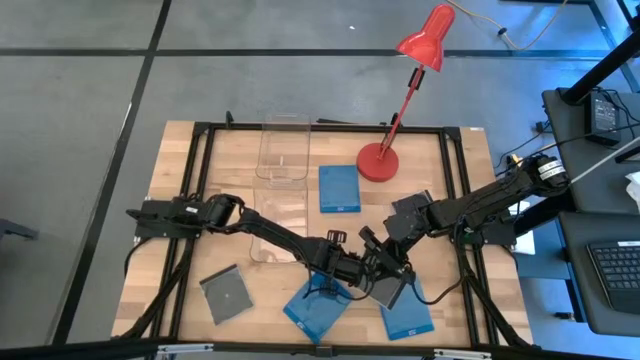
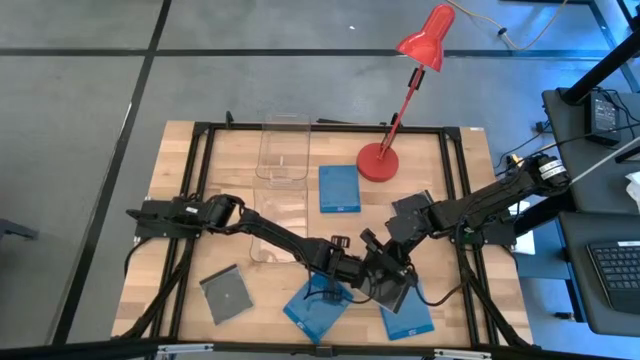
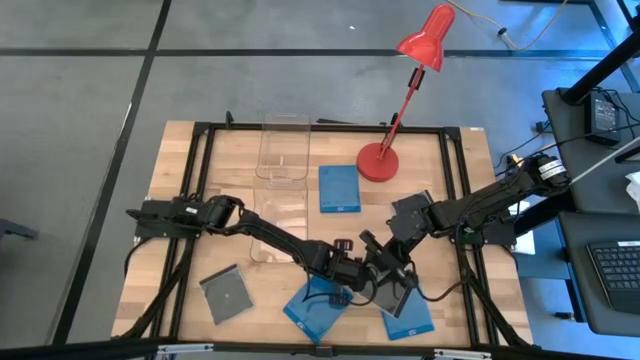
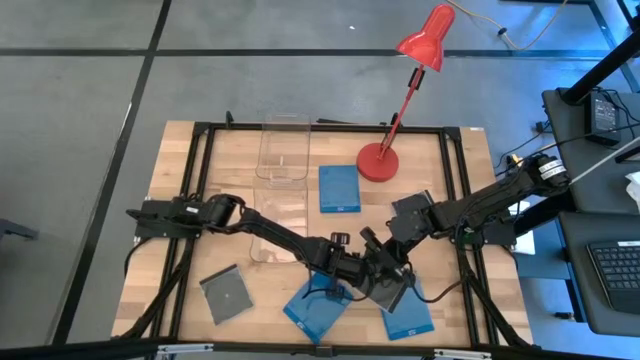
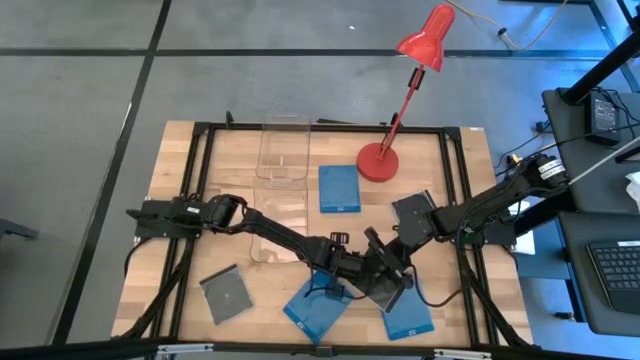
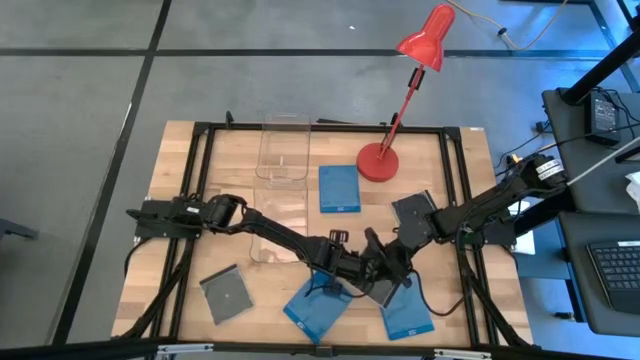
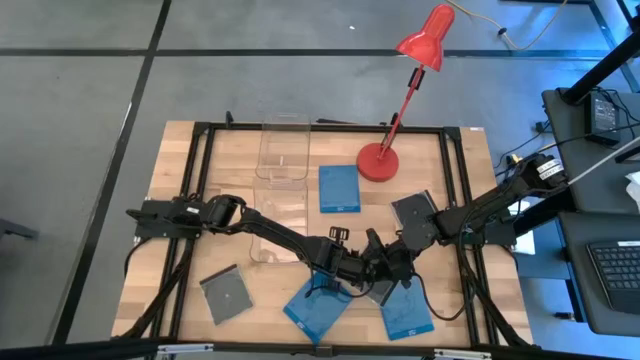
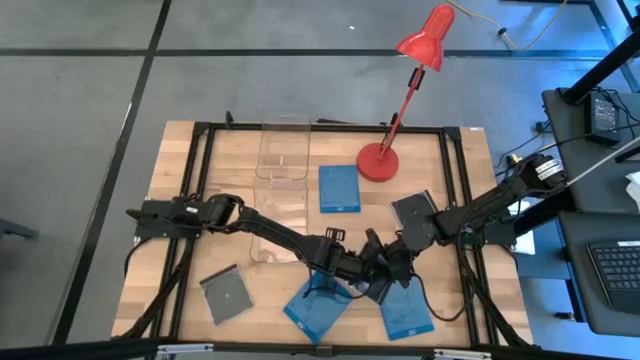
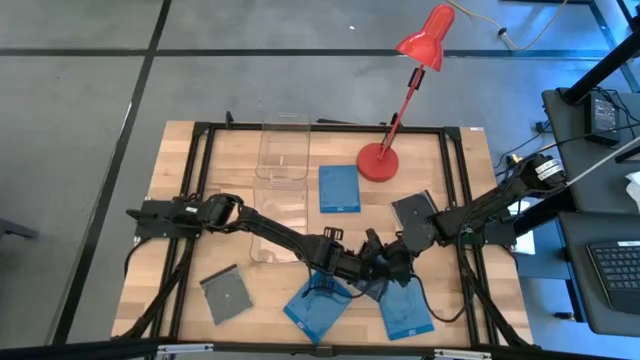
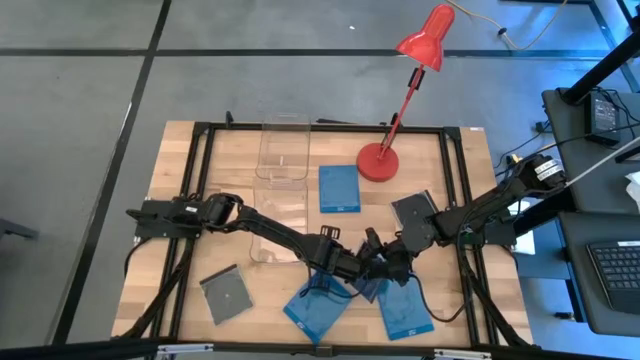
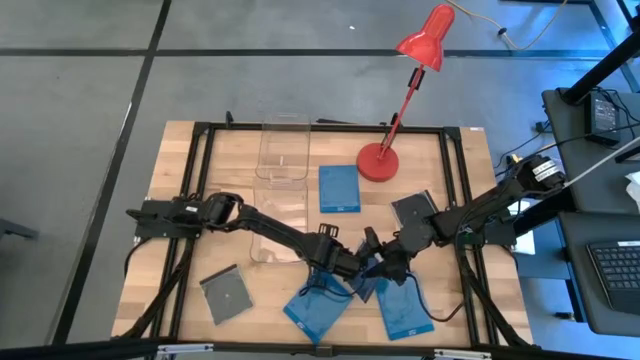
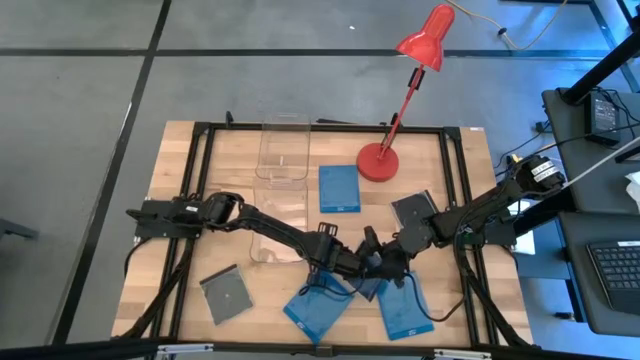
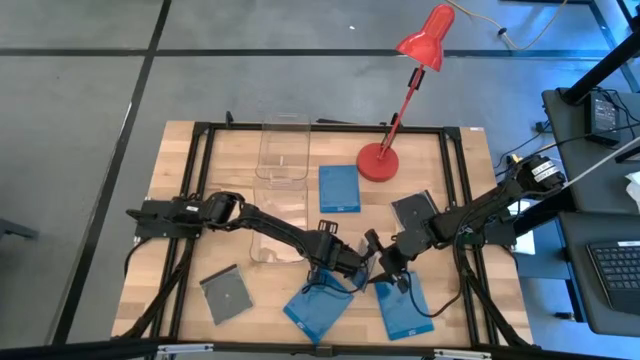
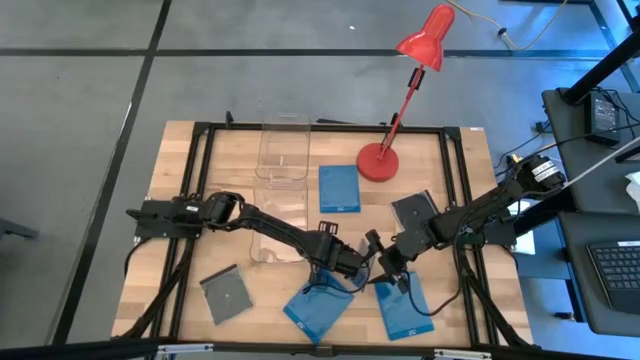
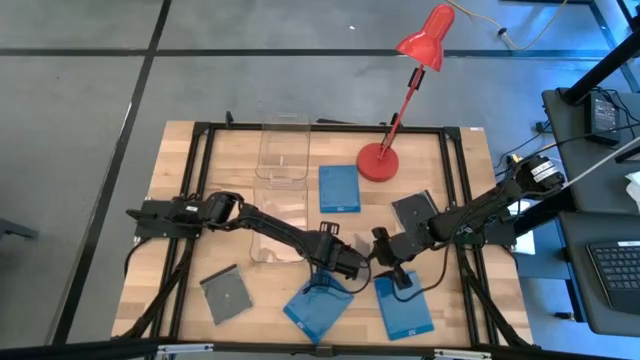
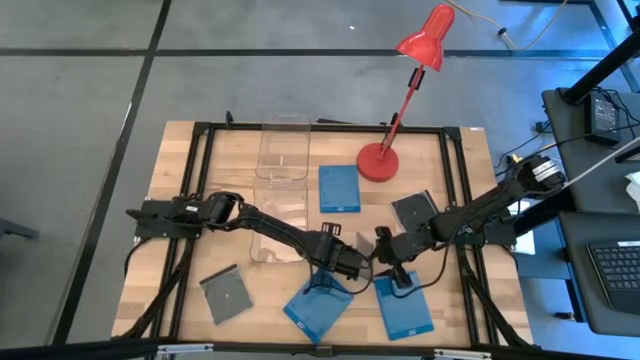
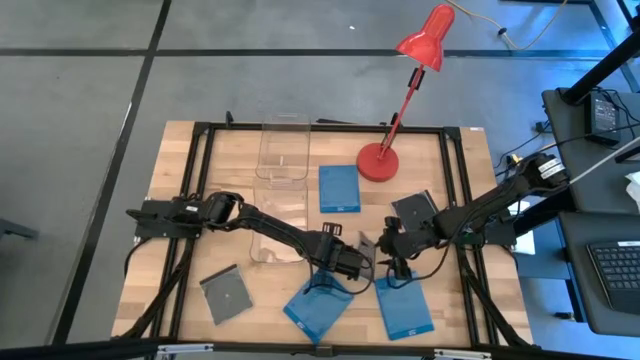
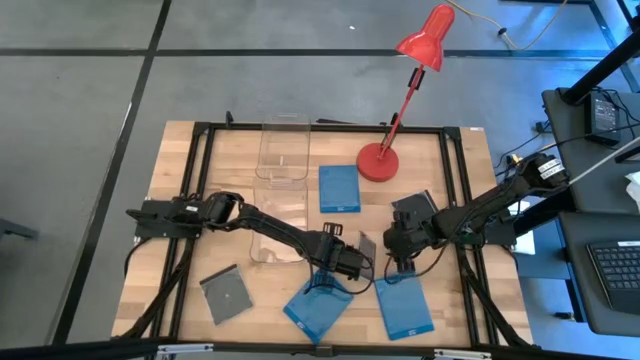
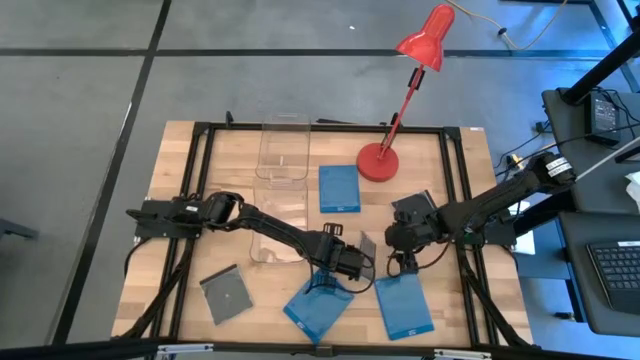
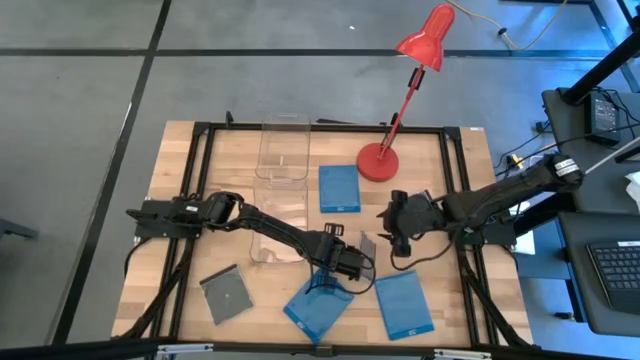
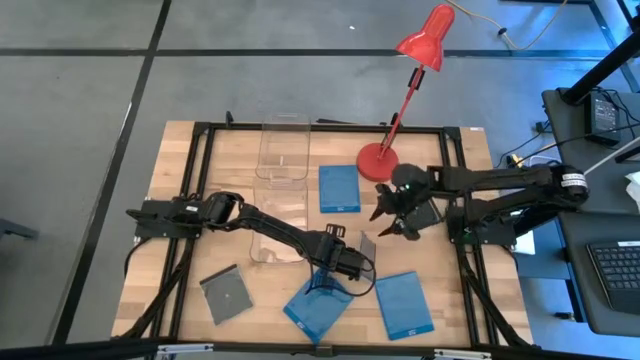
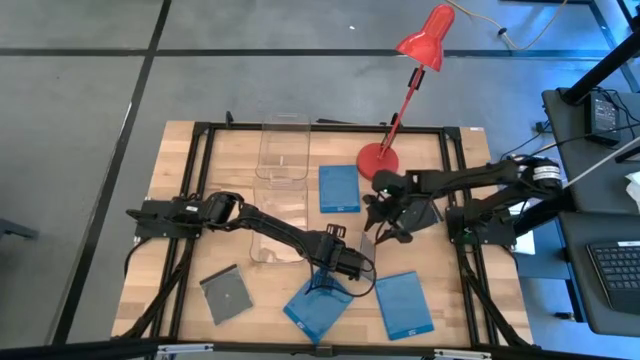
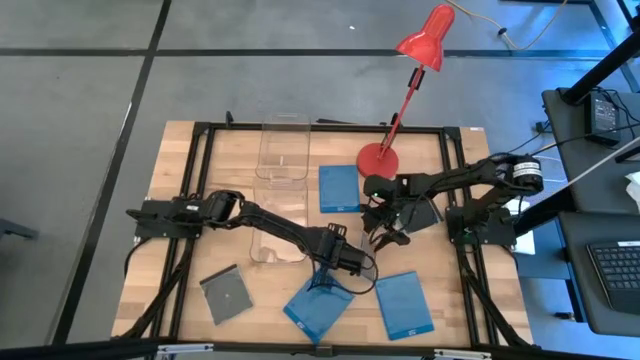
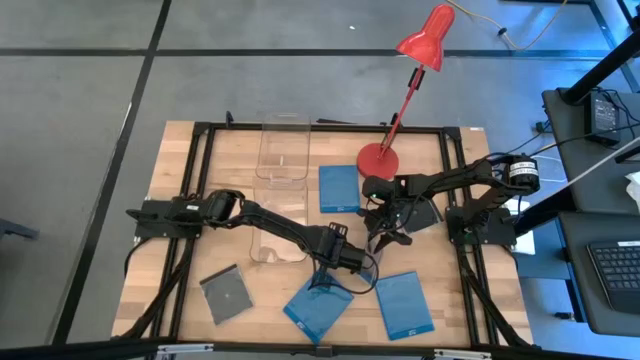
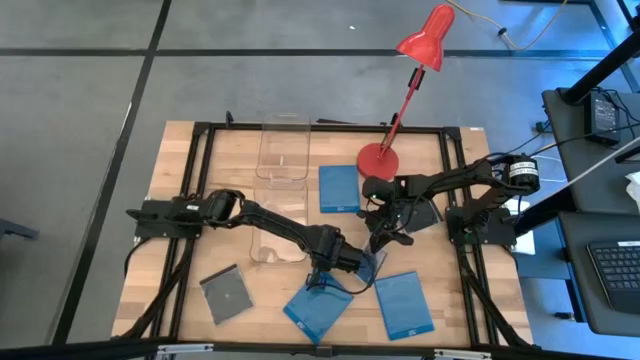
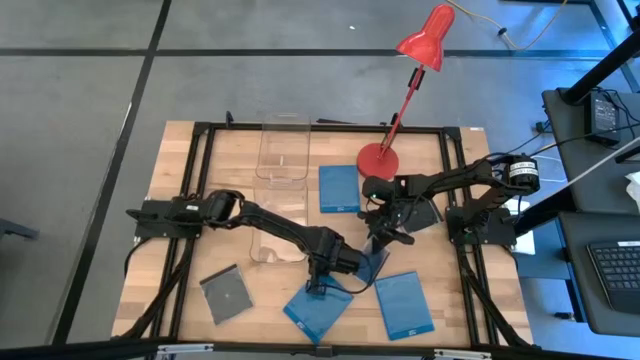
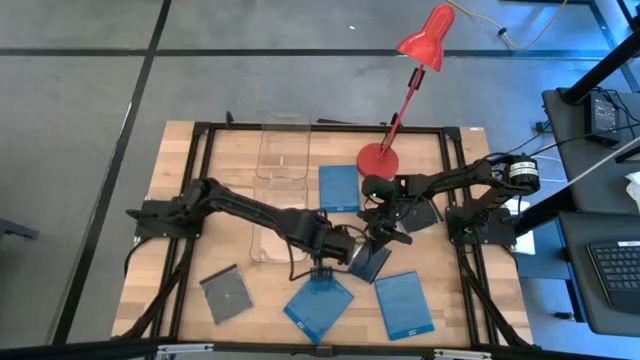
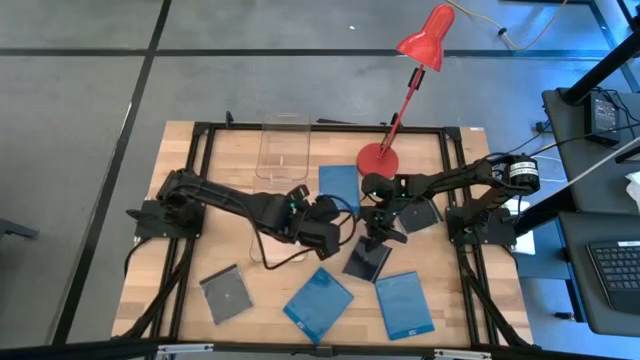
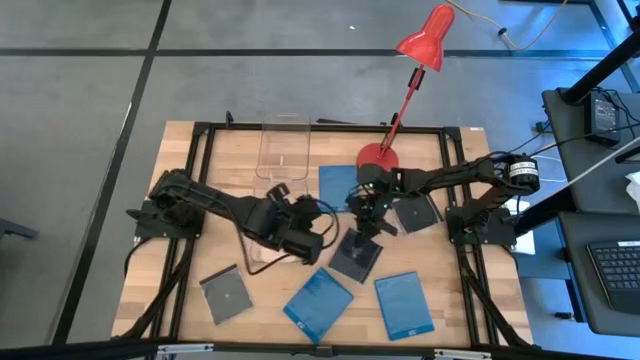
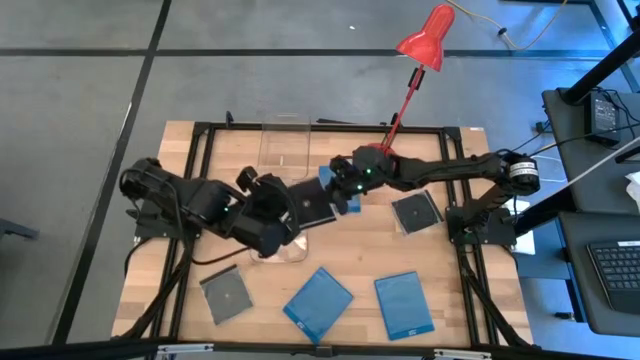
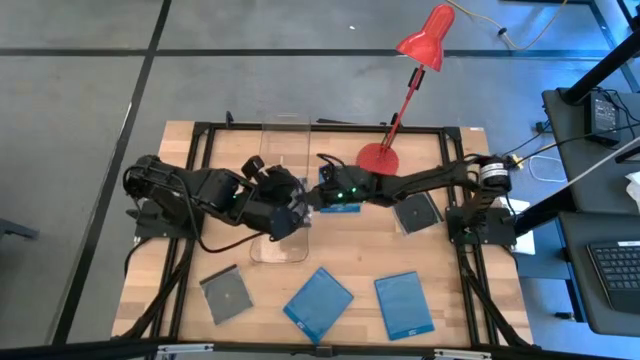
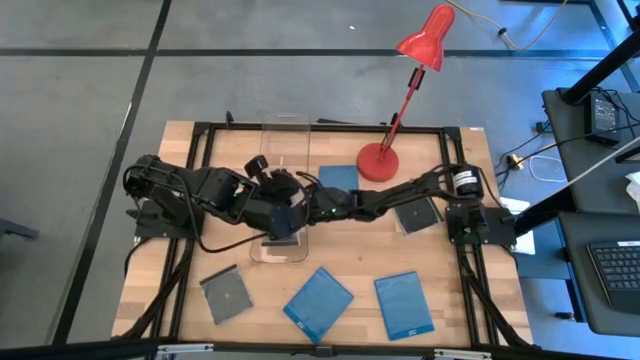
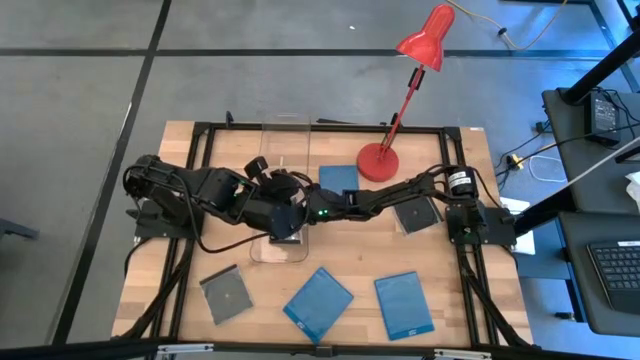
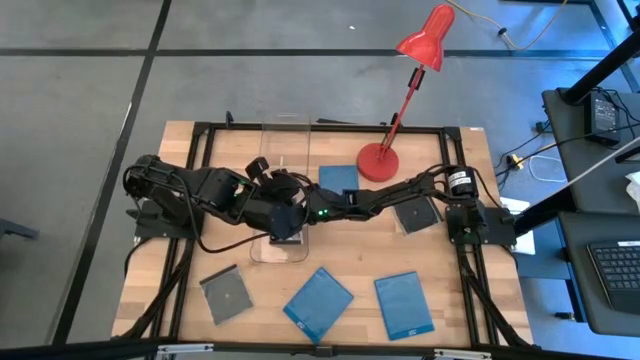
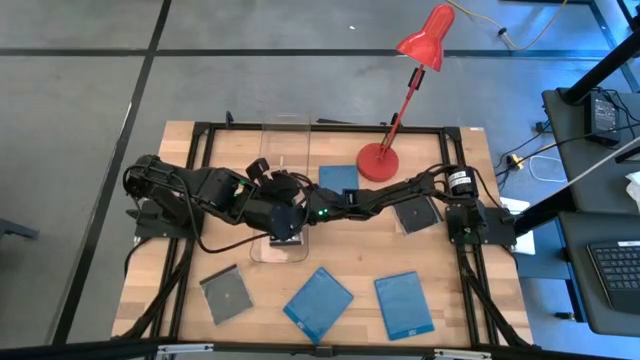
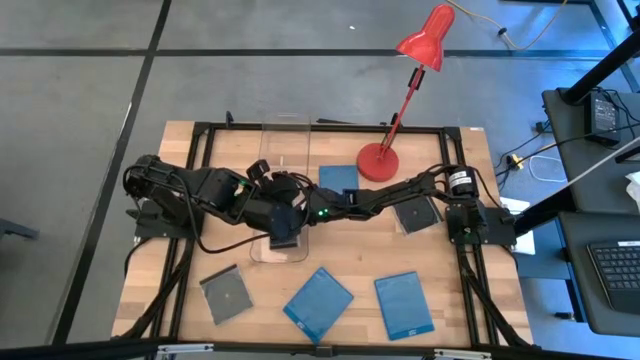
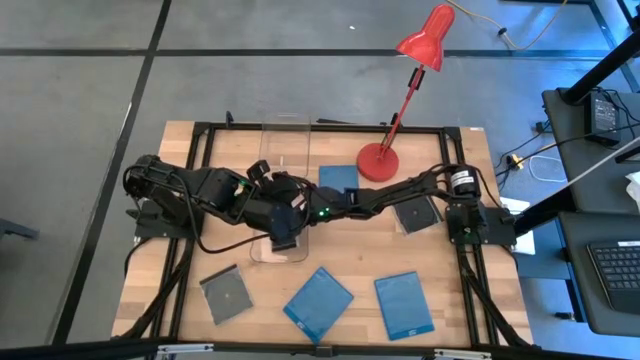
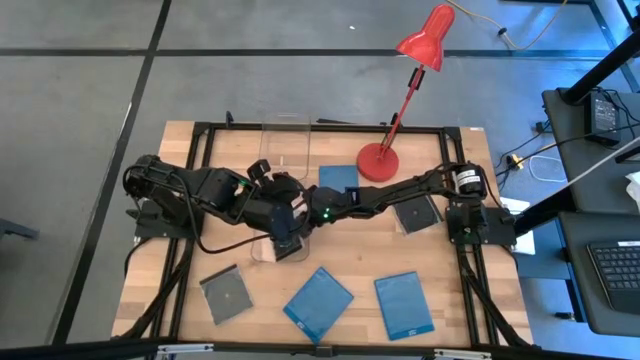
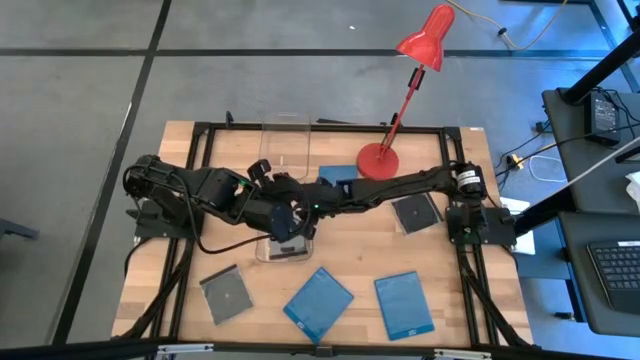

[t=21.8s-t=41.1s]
Task: Pick & place jewel cases by type
Put the middle black cd case into the bottom transparent bin
